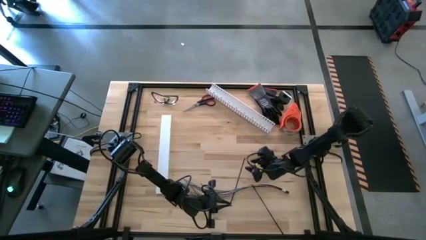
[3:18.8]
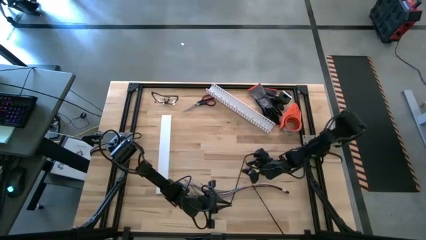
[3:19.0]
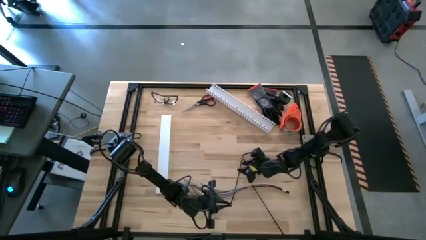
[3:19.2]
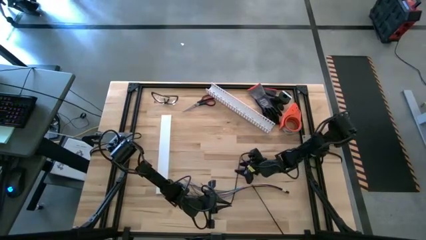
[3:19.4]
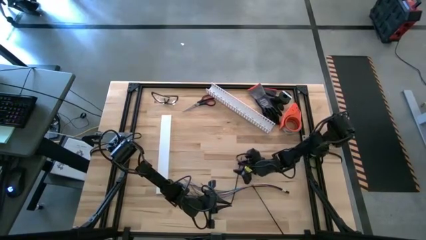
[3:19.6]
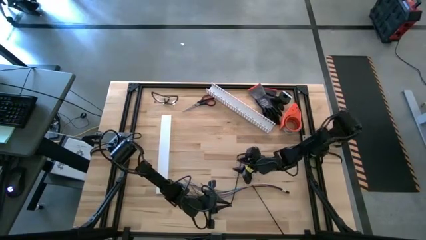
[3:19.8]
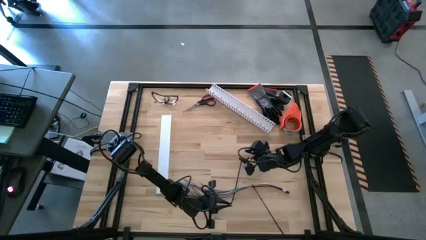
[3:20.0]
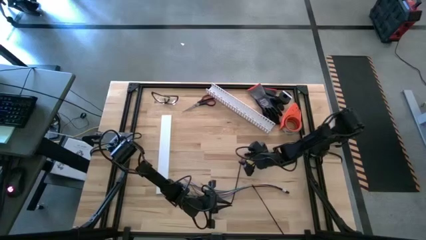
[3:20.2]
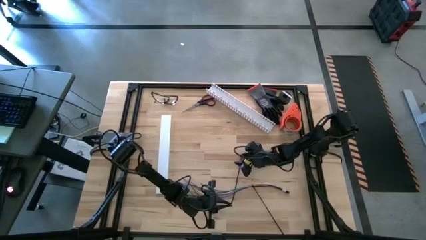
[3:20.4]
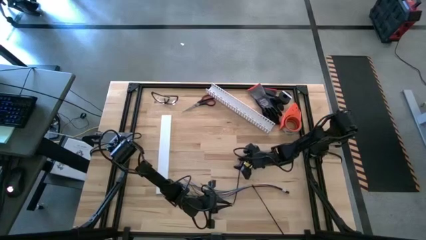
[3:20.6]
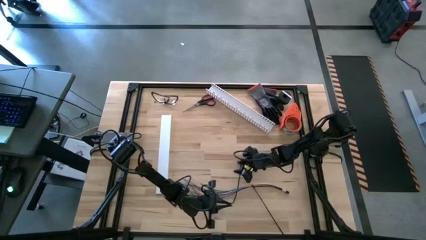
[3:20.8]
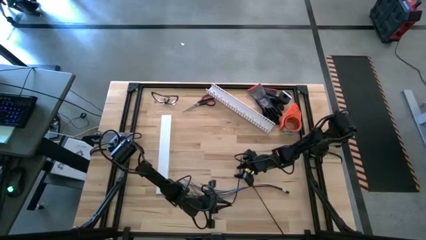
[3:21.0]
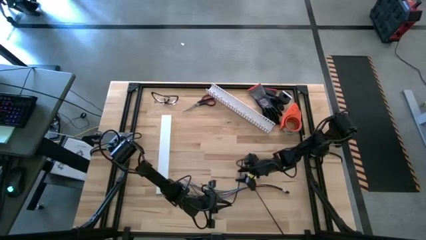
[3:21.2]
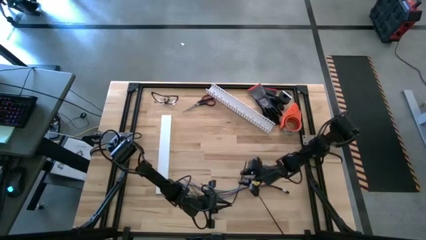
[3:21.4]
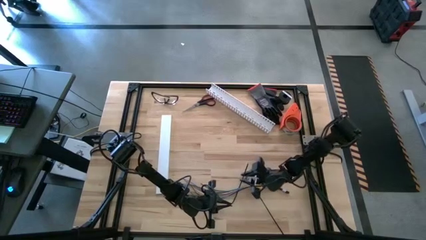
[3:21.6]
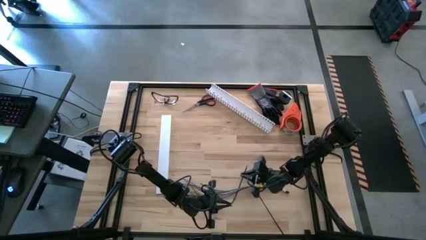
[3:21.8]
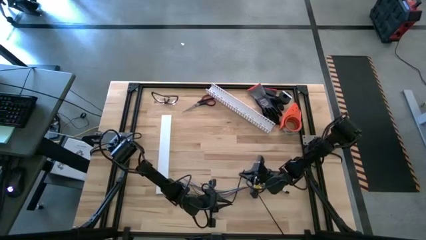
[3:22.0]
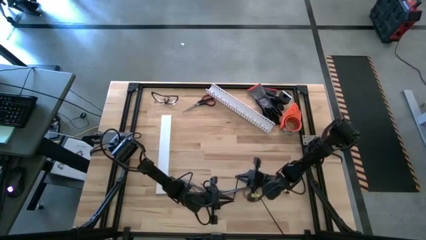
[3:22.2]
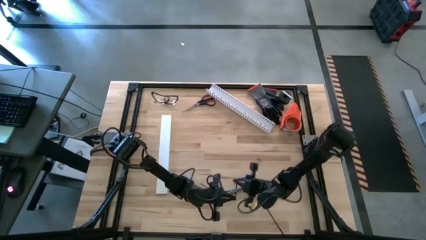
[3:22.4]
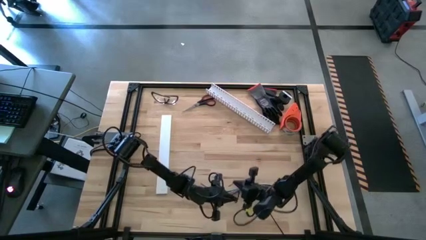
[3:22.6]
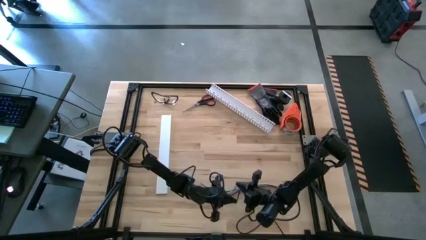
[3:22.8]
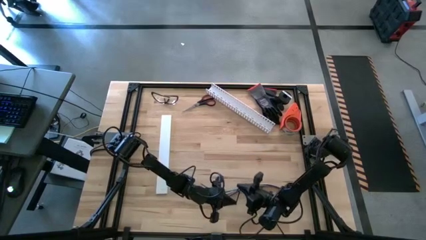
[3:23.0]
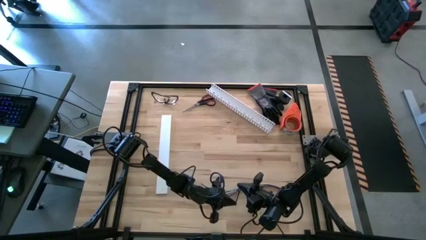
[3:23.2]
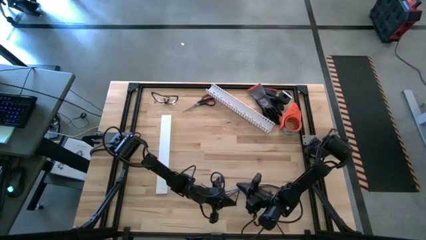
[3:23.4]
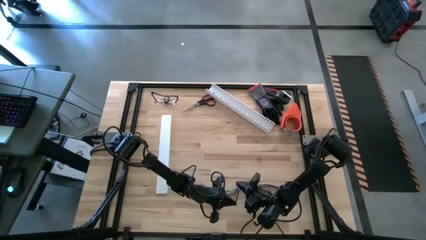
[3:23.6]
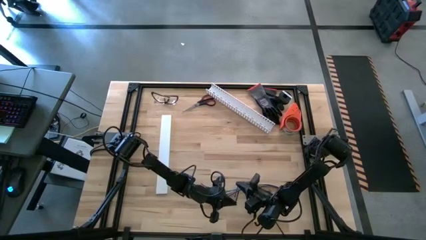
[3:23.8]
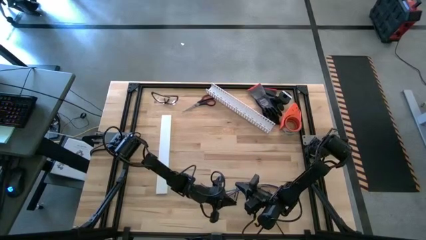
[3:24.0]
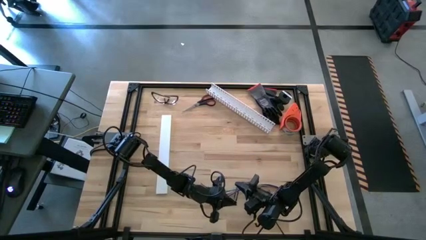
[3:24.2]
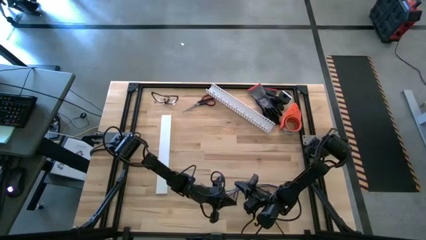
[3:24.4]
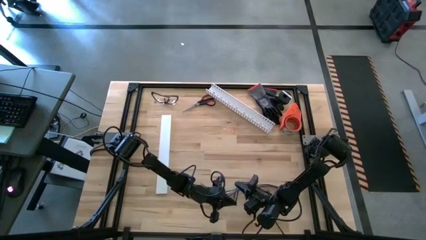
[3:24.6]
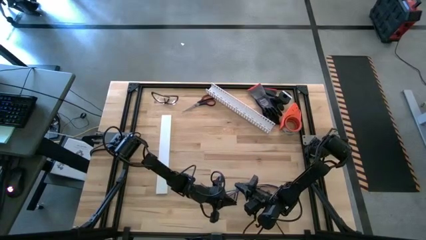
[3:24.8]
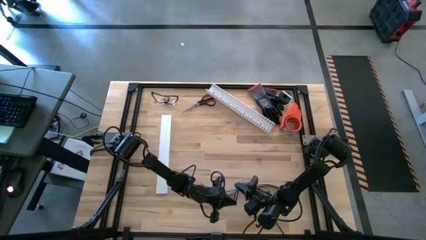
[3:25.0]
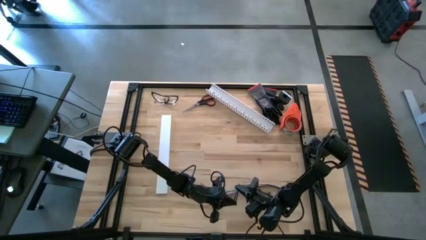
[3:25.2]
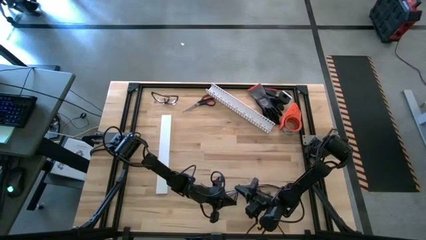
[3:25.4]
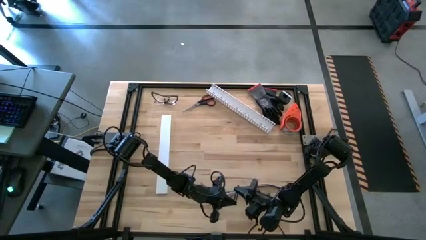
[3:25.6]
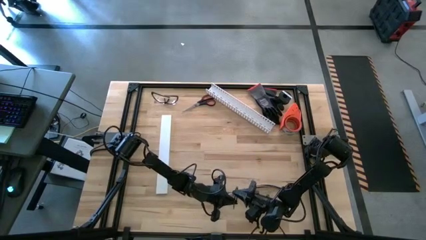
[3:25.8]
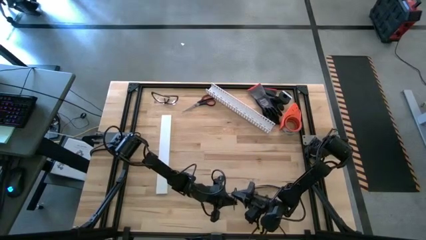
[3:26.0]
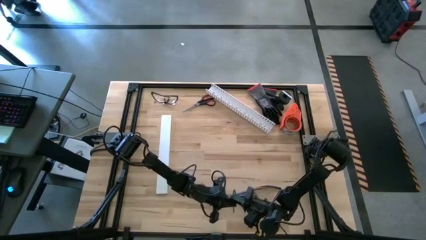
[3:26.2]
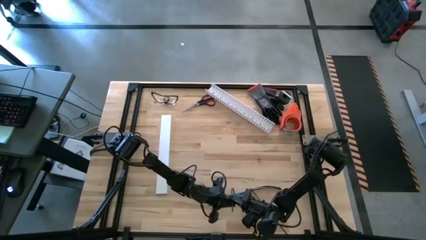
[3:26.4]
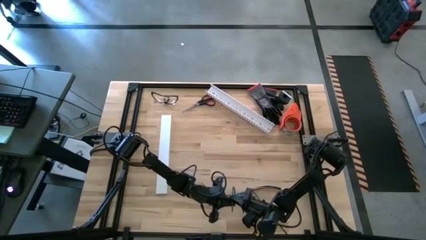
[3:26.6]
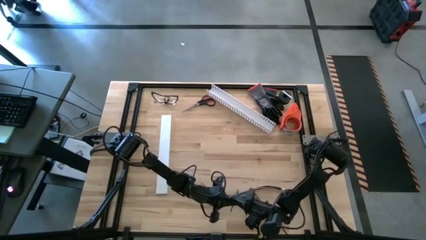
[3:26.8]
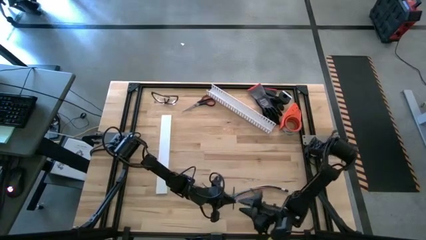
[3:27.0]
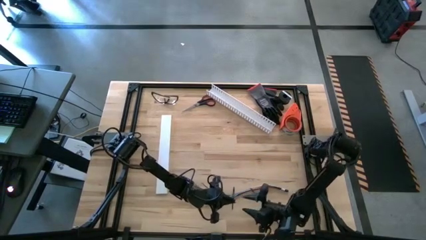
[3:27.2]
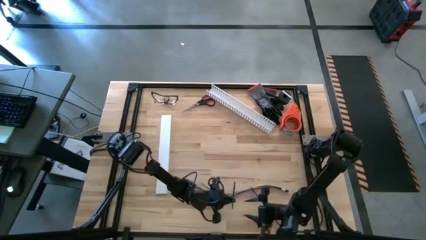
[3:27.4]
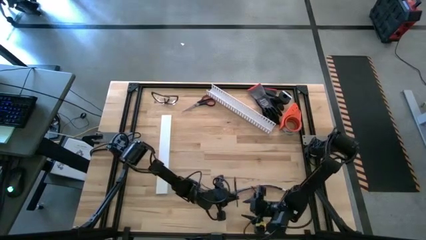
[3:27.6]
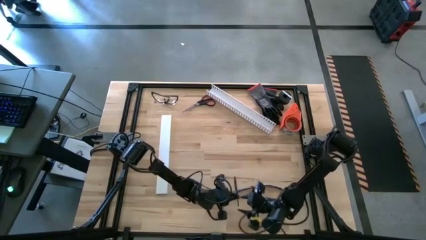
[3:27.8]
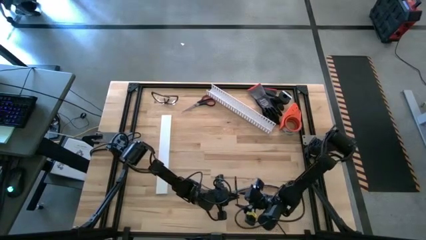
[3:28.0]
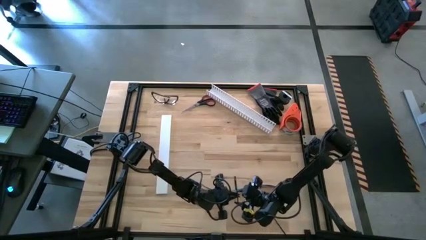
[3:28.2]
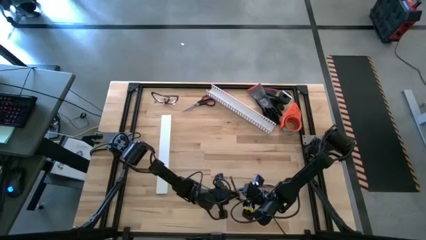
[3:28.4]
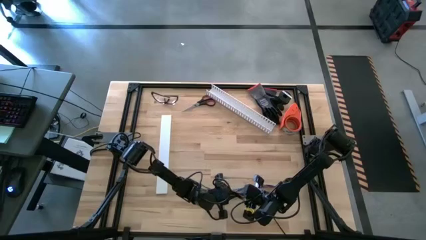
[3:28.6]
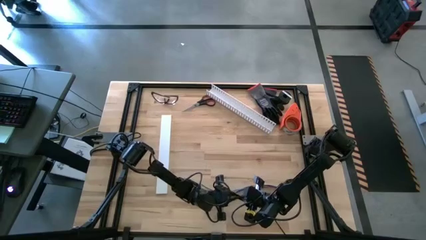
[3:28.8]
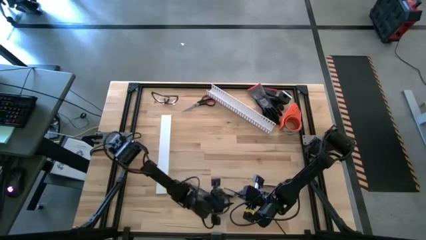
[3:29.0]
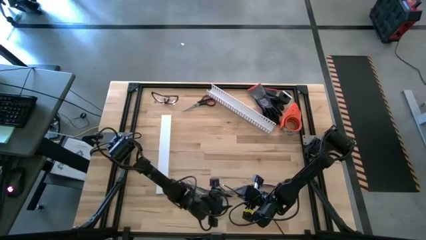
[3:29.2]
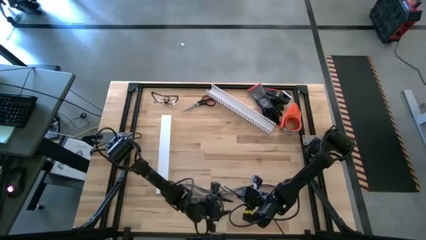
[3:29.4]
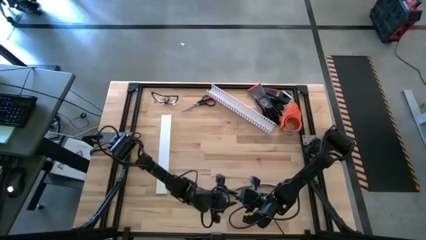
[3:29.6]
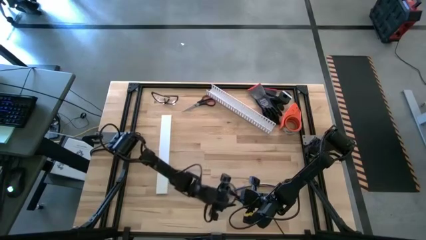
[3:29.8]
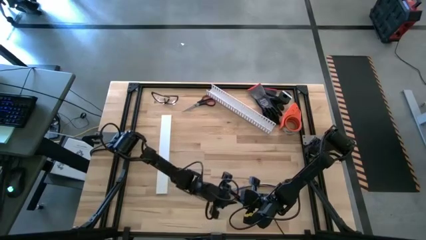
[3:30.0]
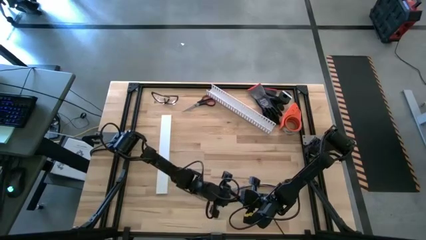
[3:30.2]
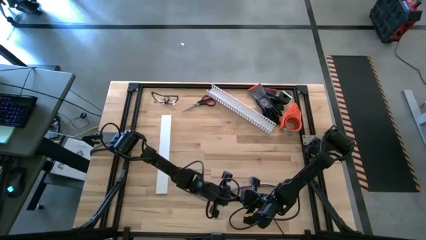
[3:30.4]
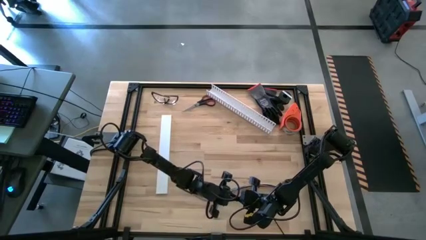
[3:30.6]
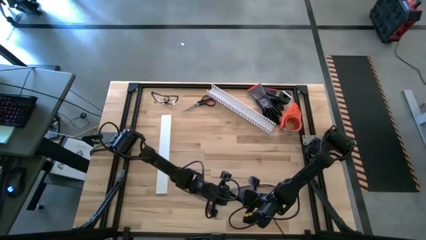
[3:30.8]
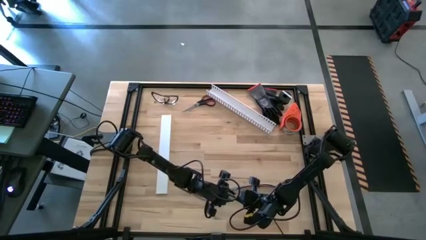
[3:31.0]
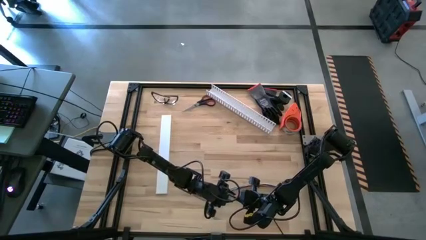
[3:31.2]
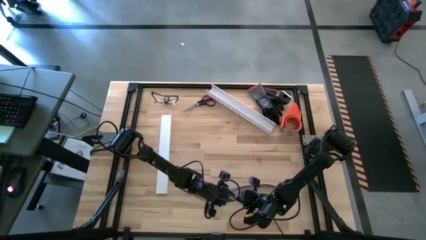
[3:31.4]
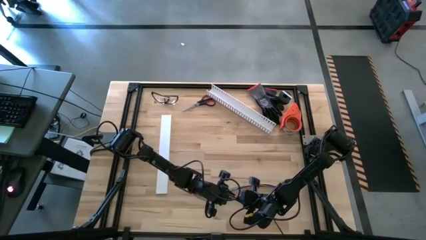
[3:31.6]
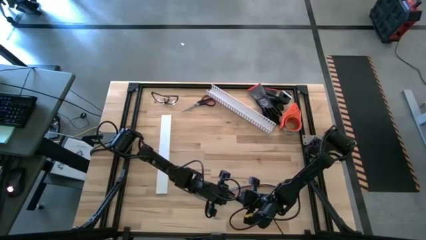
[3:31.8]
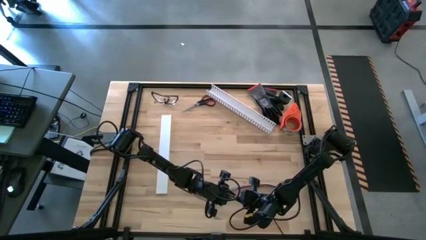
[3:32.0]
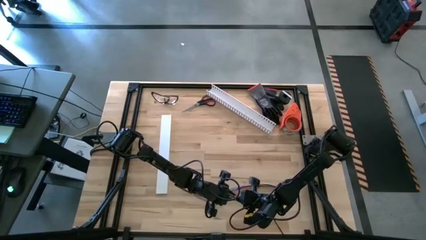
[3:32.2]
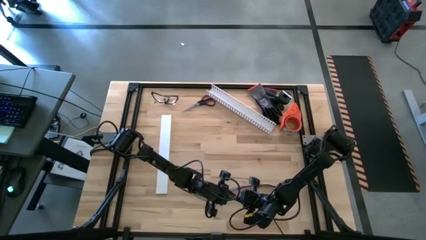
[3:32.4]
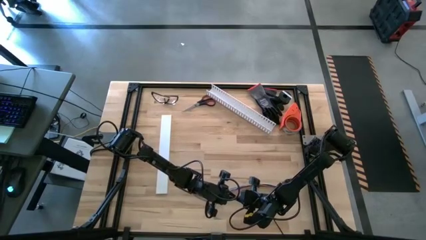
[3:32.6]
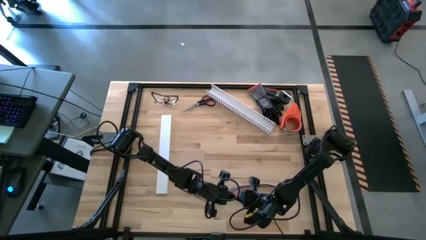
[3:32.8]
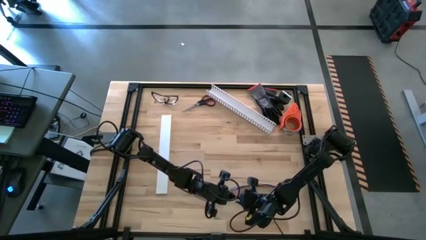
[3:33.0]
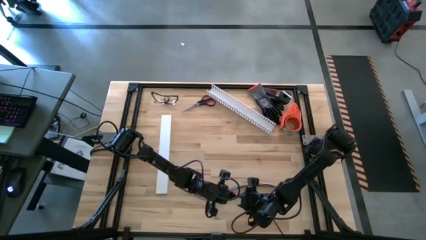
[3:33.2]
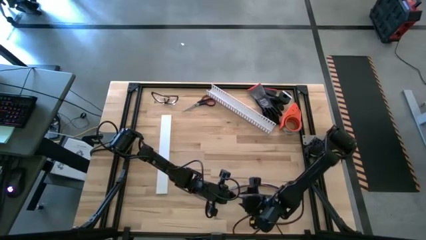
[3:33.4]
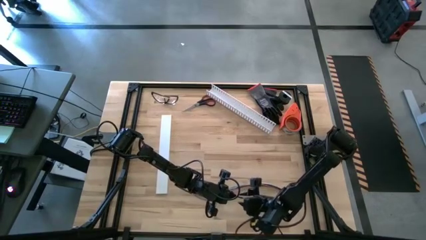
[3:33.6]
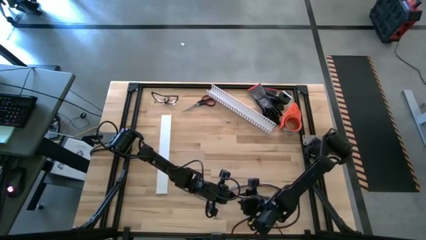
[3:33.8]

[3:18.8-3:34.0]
Task: Ziptie cables
Wrap the black zip tie on the cable wires
